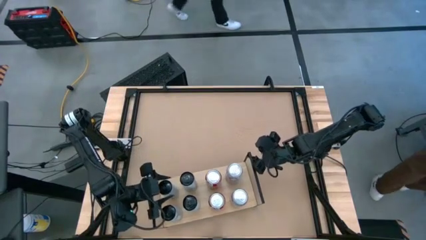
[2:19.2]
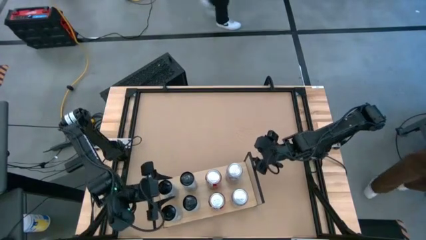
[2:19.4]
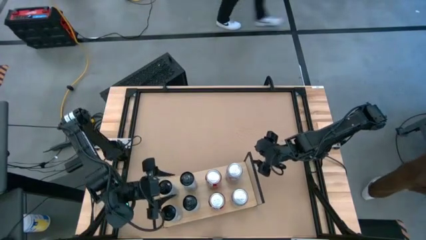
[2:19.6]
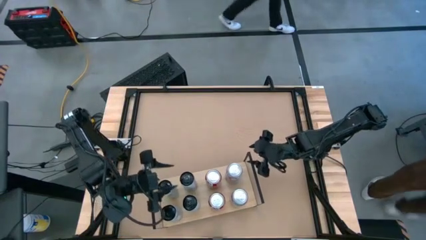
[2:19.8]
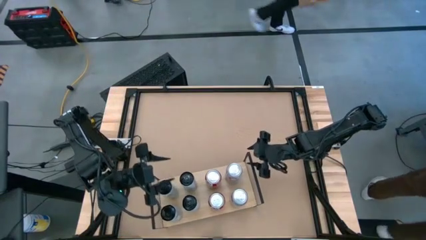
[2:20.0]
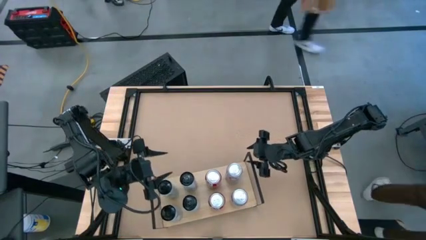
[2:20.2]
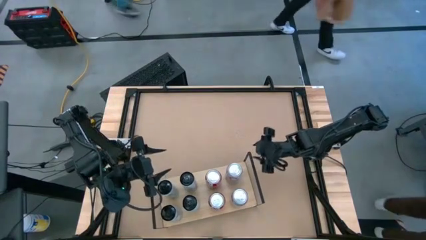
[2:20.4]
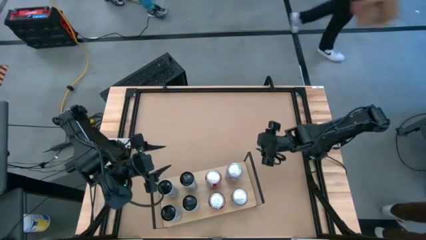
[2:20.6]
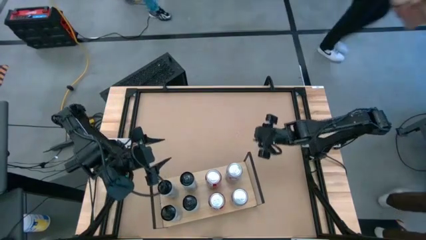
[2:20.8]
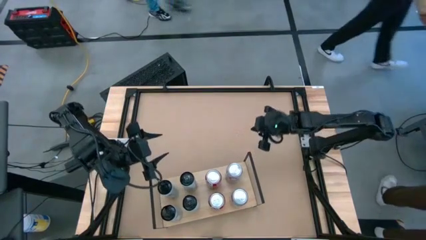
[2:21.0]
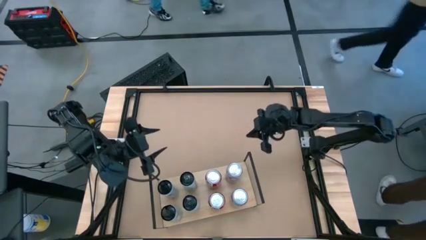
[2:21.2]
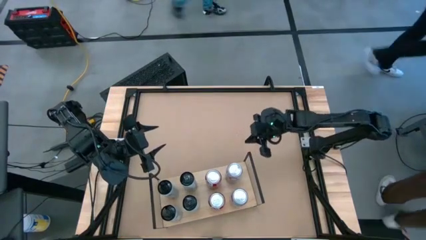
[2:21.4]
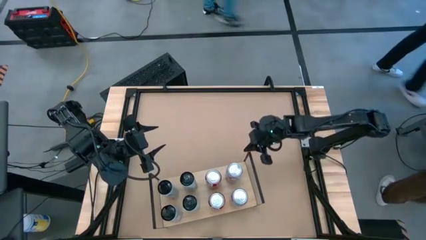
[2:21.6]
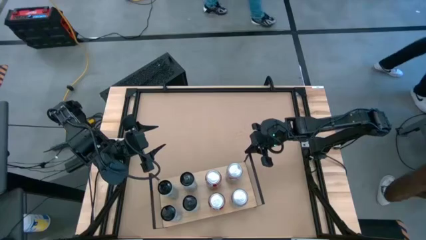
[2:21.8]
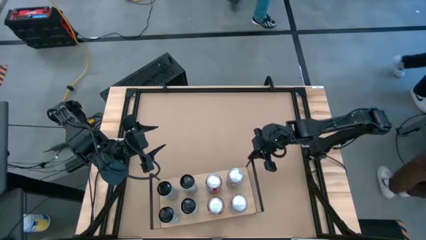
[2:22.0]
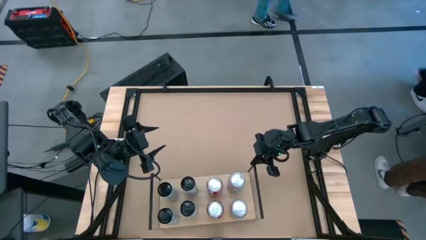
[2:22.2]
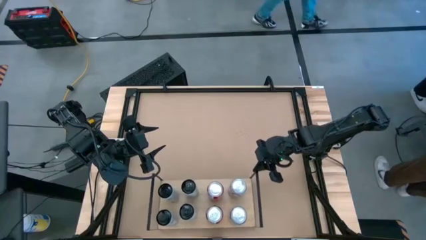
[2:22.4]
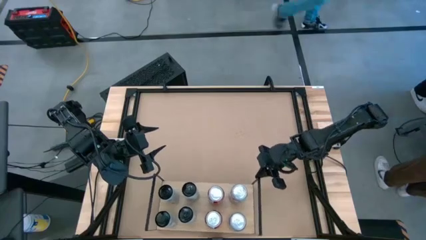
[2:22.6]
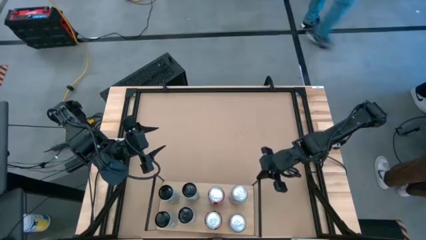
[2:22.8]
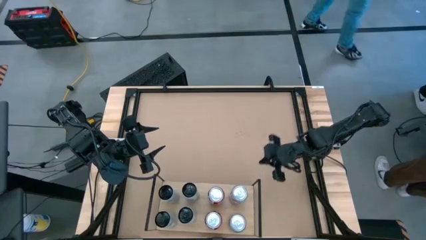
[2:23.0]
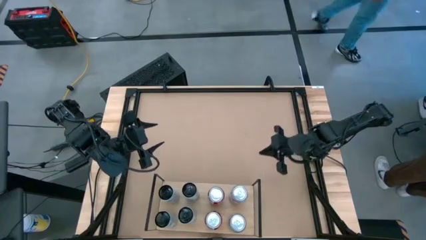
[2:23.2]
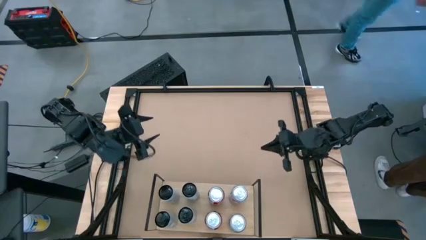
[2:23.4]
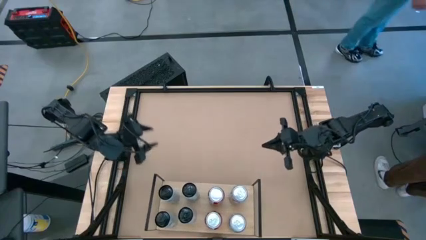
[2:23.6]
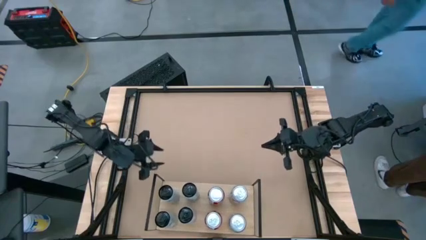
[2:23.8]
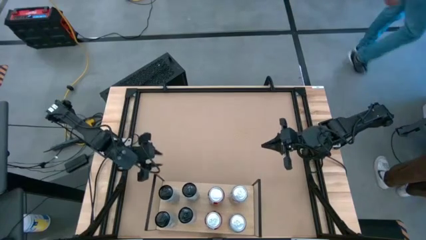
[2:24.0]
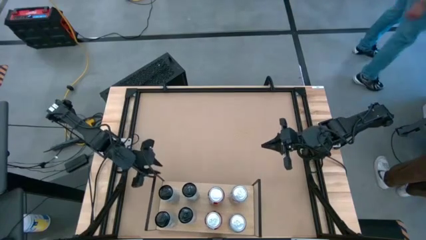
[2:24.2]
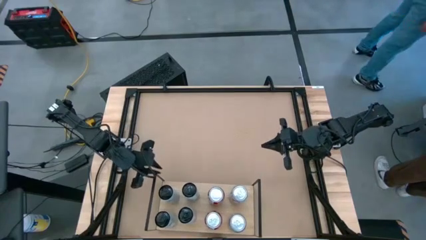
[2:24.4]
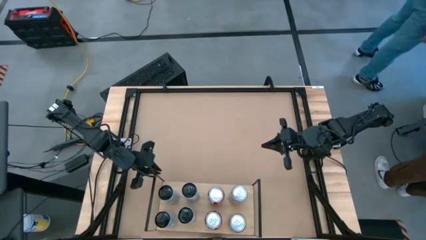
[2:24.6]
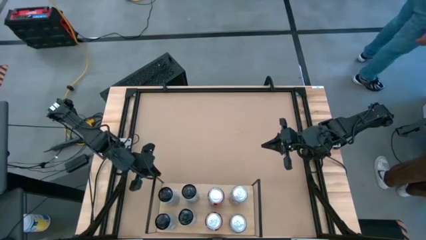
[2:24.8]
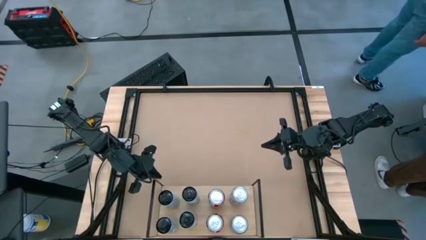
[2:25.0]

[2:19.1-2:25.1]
Task: Place canned beverage on shelf
Adjust the shelf

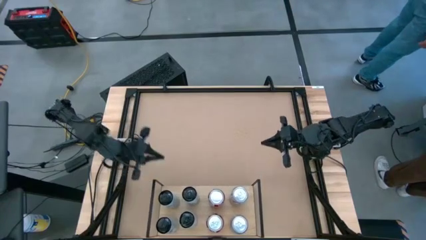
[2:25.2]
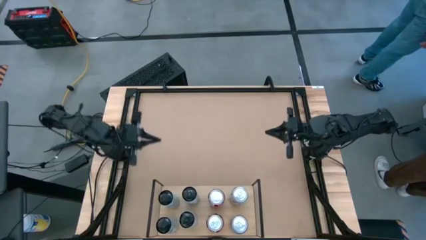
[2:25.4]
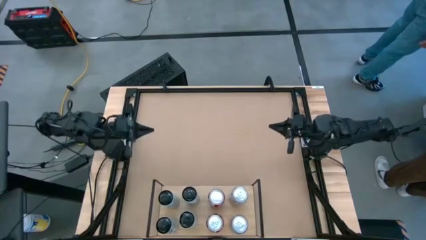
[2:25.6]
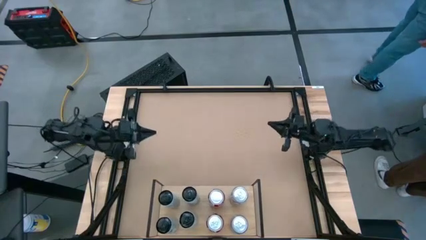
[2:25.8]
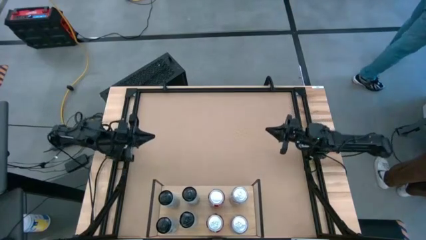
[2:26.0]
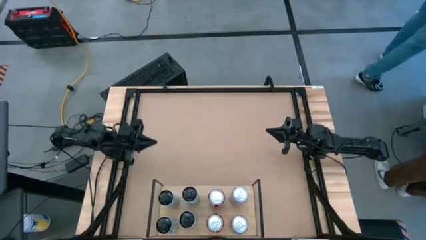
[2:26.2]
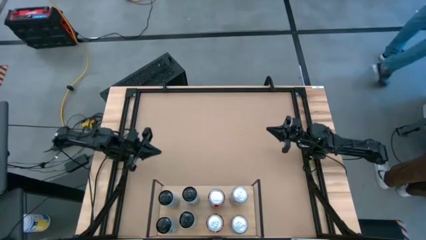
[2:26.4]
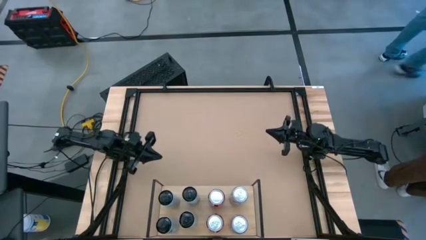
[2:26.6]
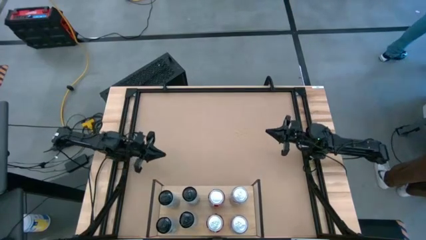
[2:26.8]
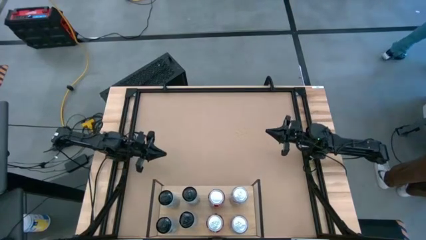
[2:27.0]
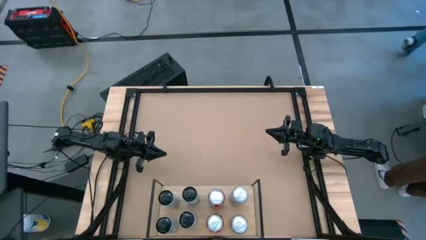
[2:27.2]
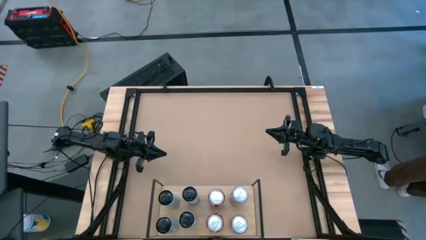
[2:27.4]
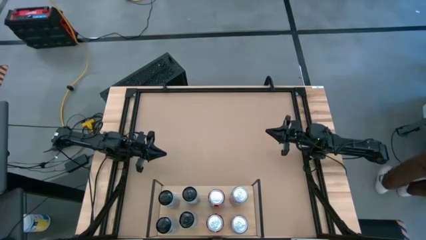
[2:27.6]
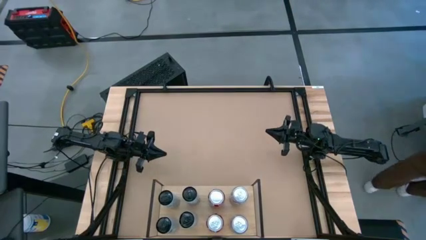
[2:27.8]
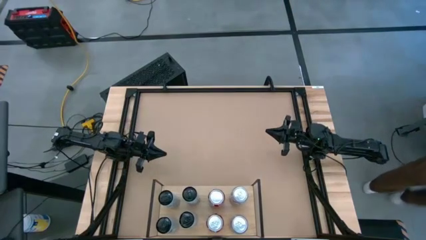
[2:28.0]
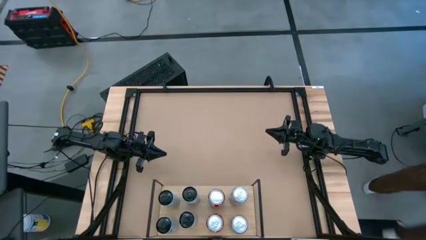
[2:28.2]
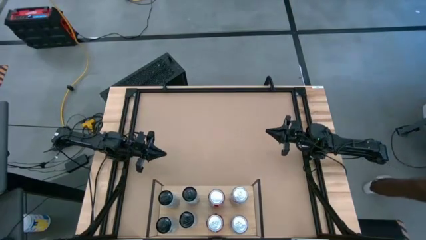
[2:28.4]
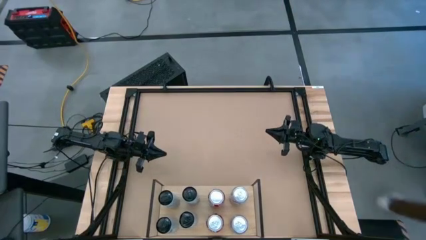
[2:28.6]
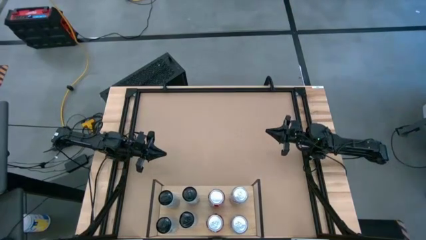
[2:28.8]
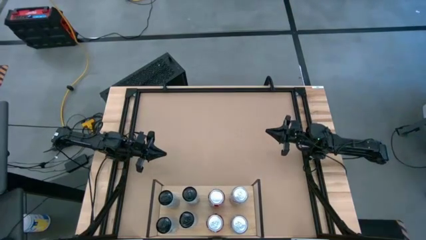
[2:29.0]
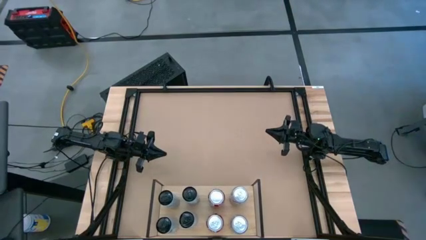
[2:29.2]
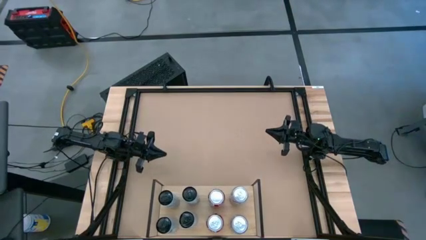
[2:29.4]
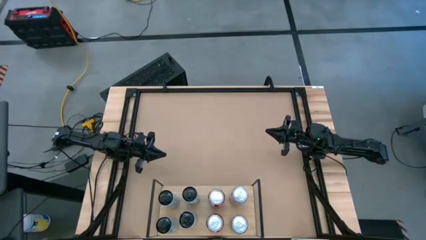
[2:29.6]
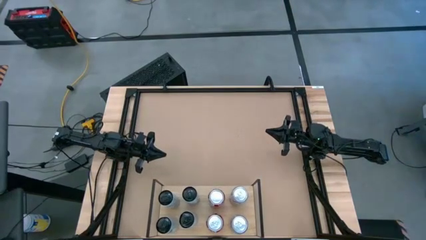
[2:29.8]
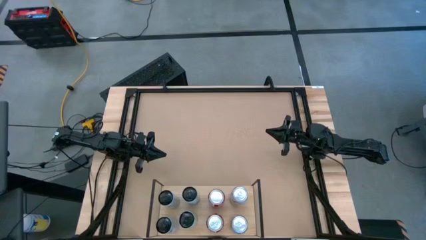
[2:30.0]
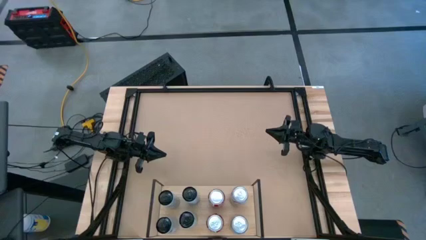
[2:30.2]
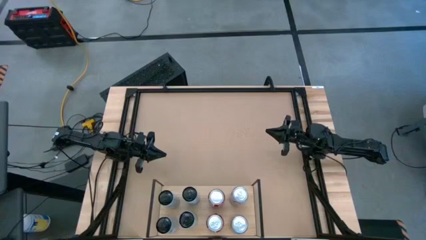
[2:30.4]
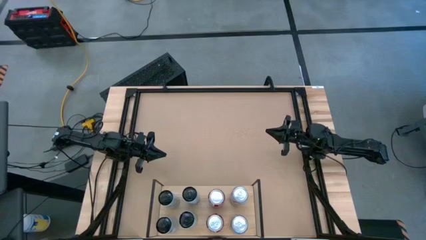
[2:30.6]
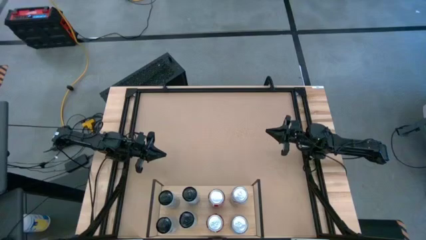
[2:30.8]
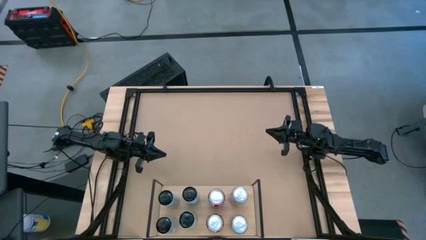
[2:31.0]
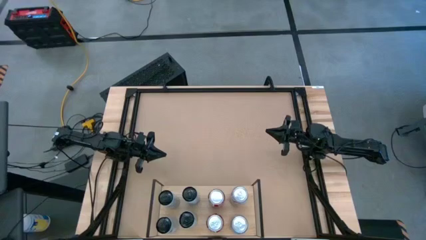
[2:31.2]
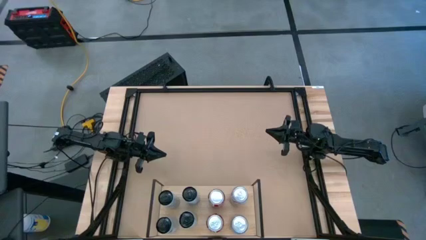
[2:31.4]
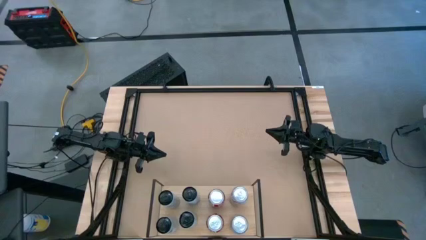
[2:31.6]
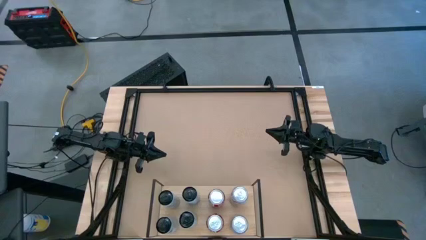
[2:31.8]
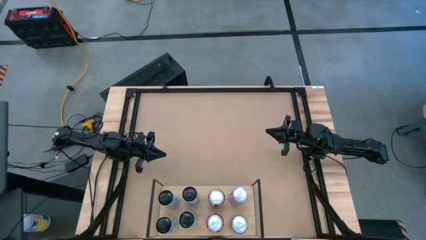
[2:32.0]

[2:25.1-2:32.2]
Return to Home Position
